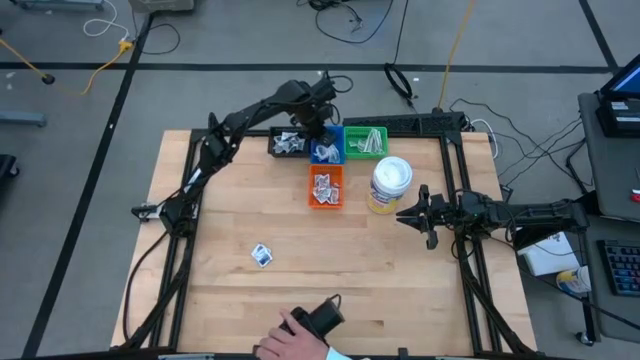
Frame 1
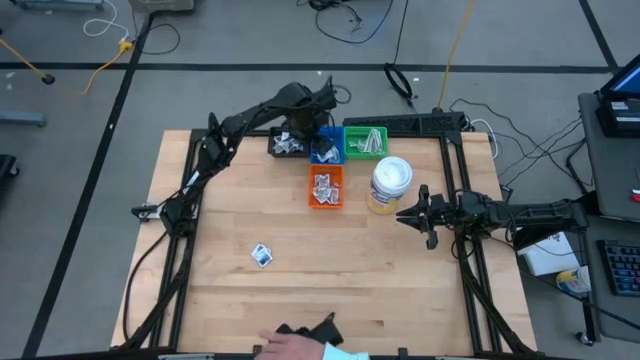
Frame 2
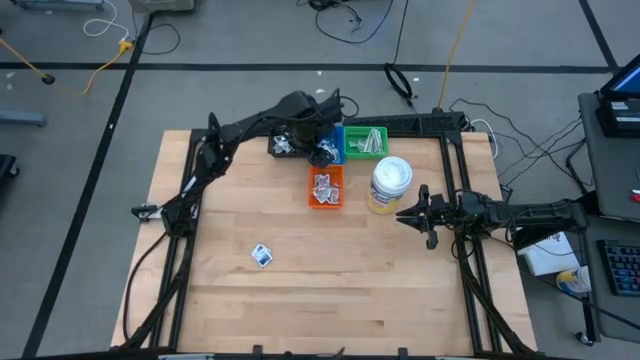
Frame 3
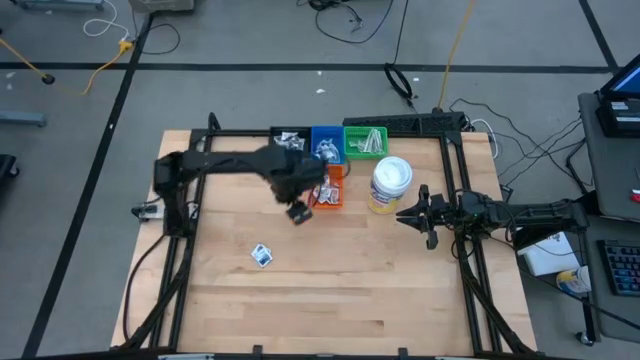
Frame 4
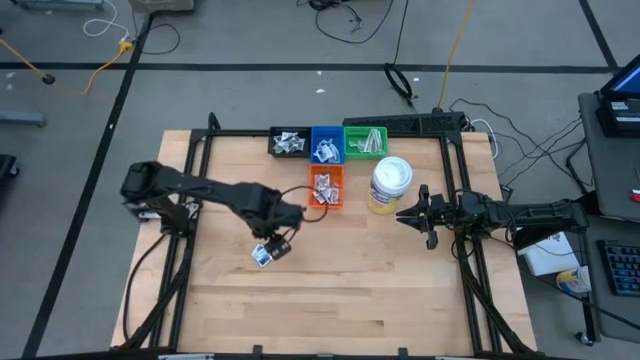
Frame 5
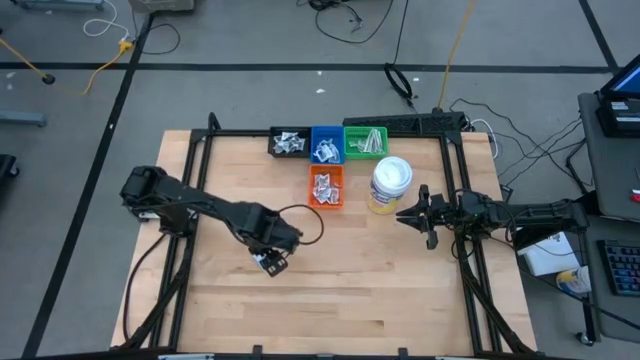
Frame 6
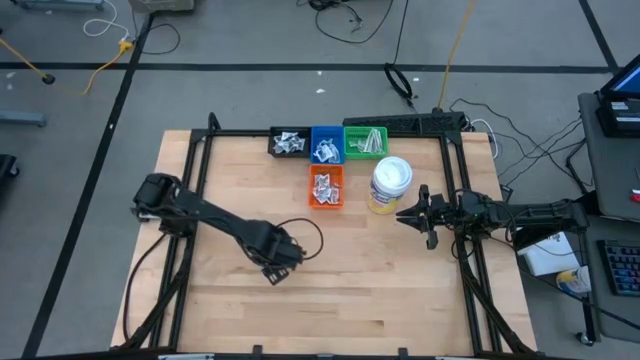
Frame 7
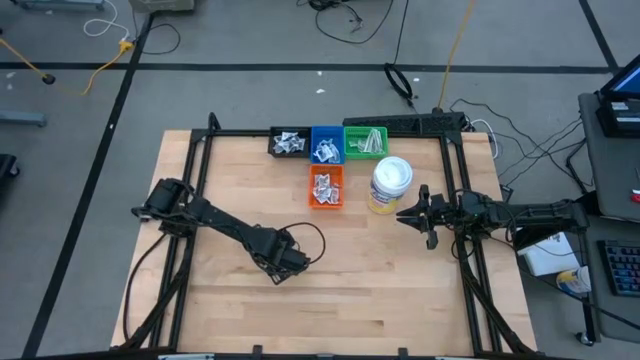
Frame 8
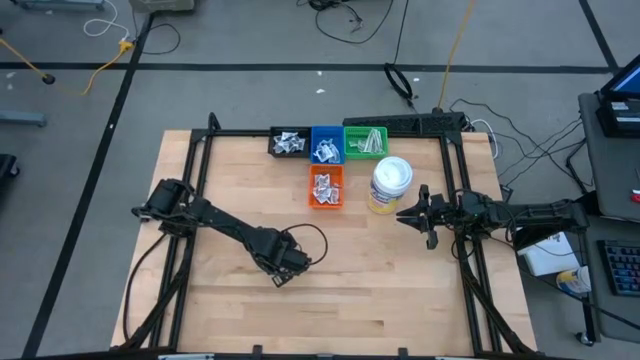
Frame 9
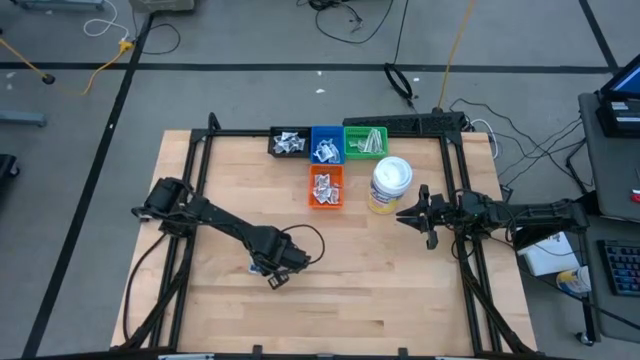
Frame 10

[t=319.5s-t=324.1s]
Task: Pick & Place First Aid Supplies
Put the blue alcohol pad into the blue bin

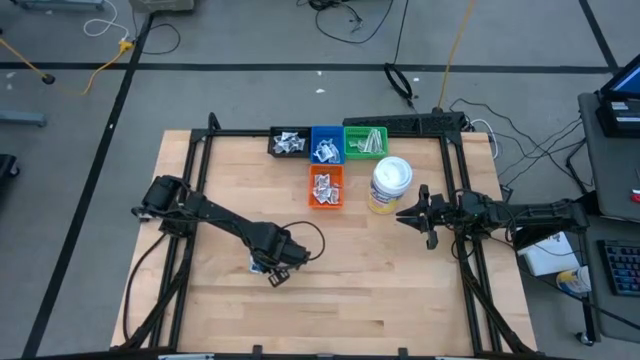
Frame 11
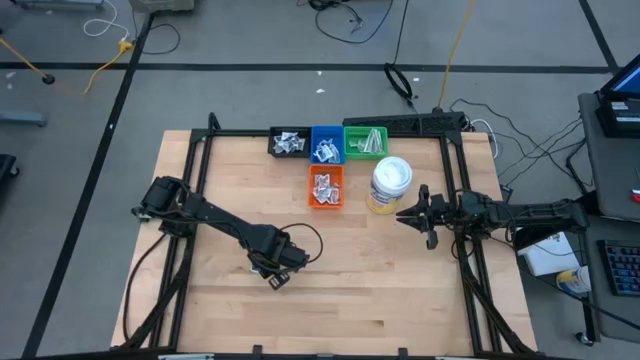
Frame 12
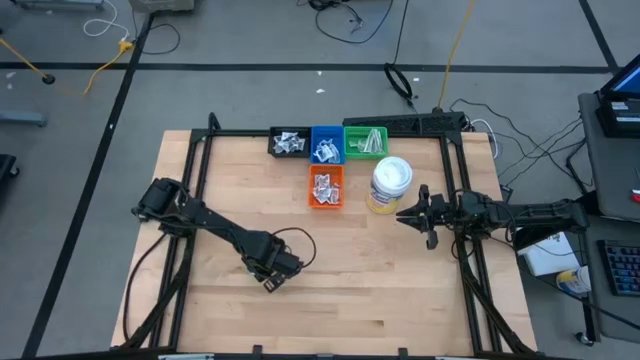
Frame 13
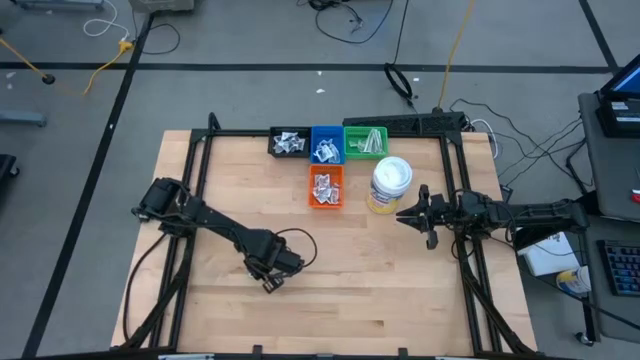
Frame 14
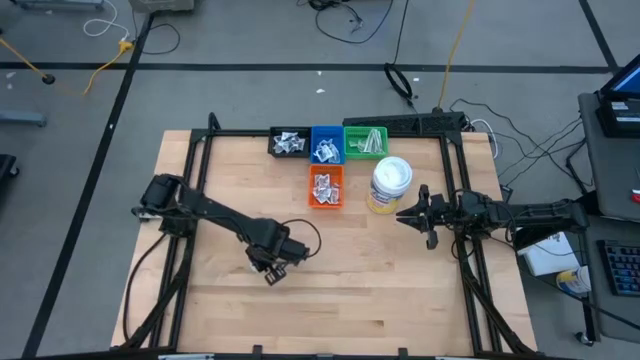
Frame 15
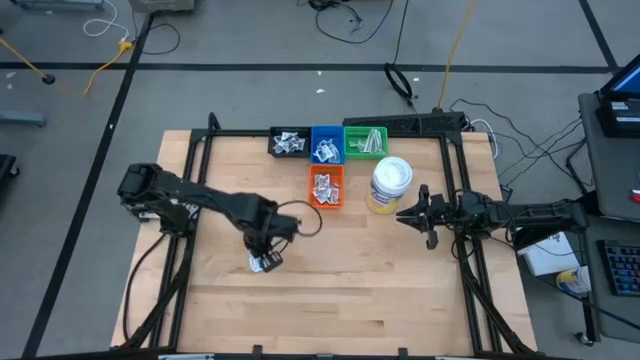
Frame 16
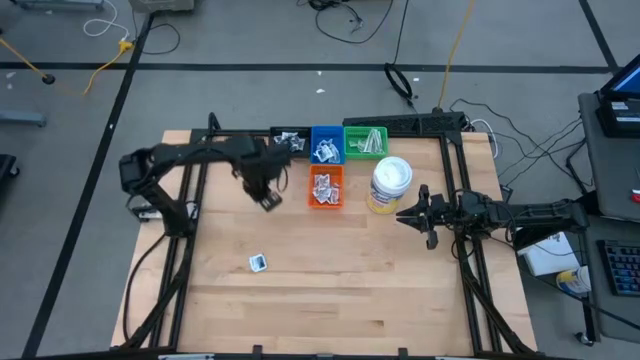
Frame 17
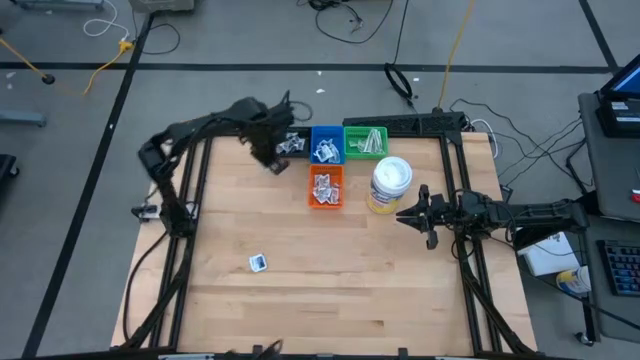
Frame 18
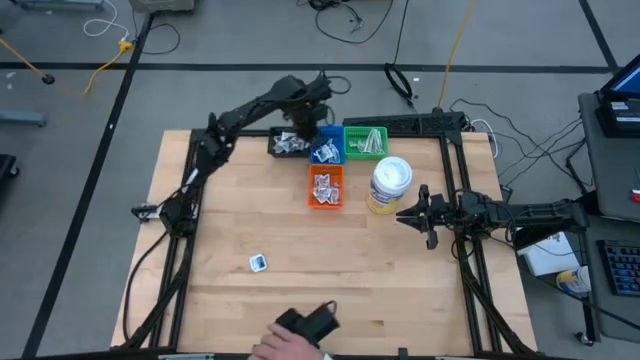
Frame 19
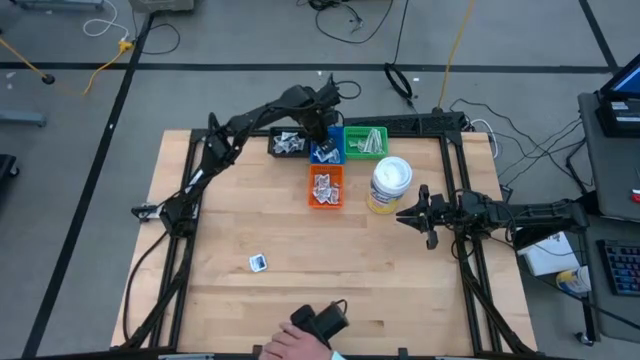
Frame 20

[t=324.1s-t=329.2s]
Put the blue alcohol pad into the blue bin

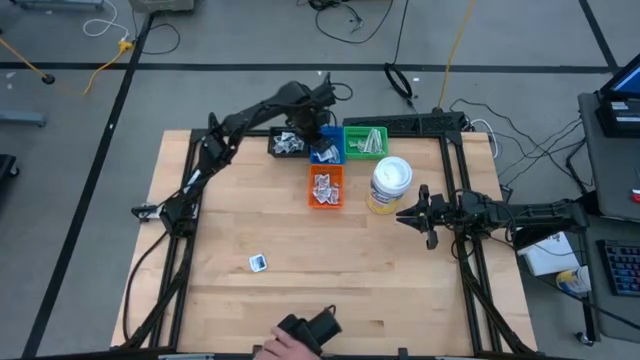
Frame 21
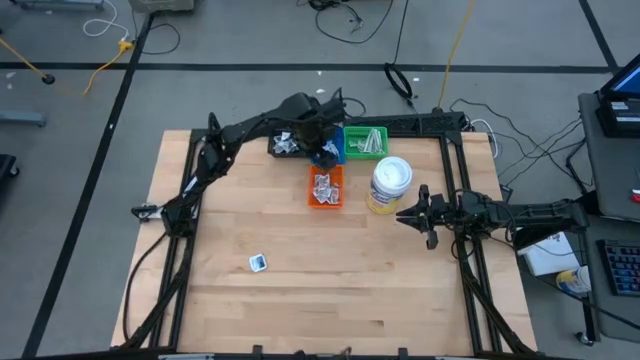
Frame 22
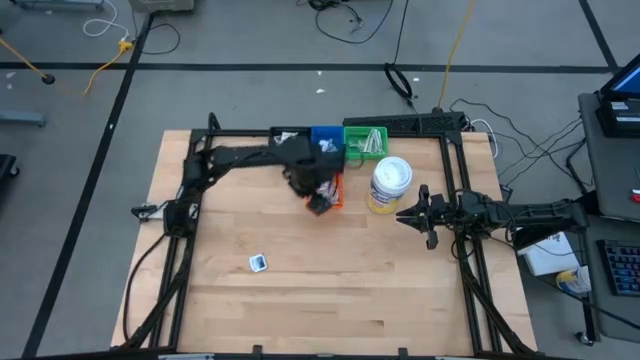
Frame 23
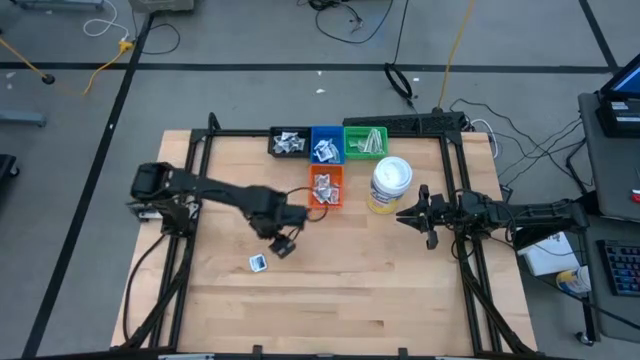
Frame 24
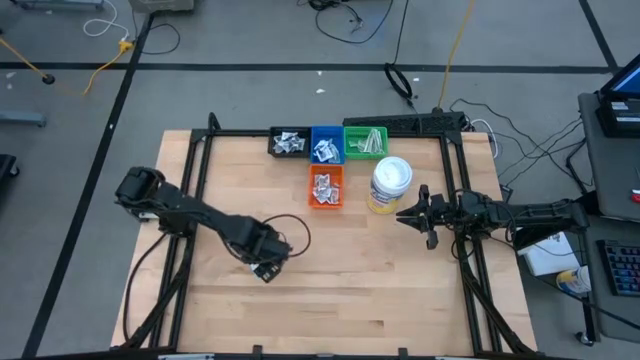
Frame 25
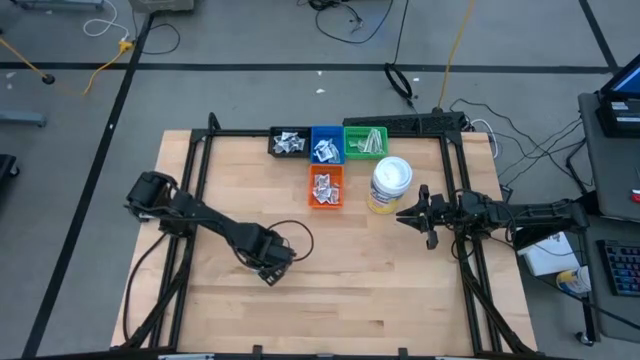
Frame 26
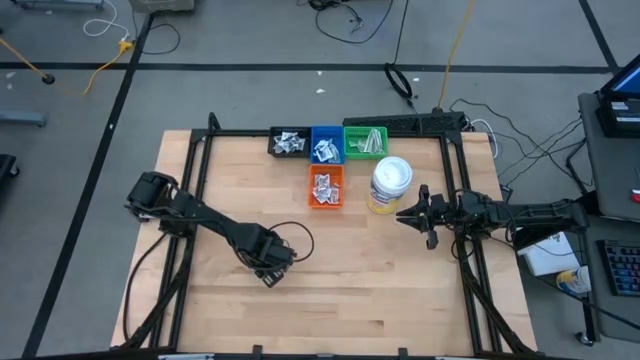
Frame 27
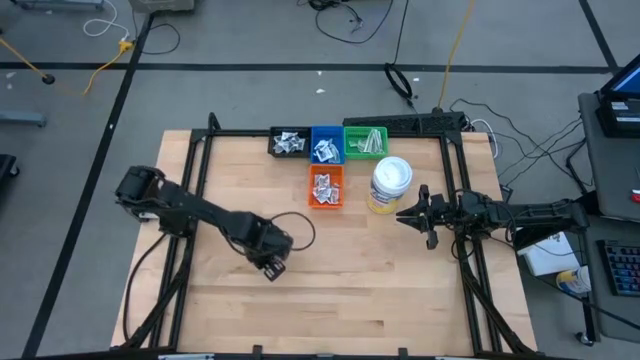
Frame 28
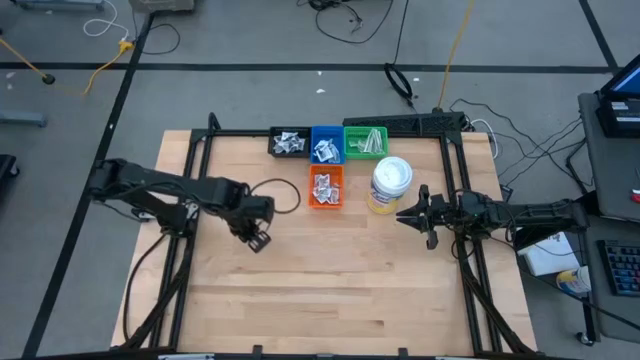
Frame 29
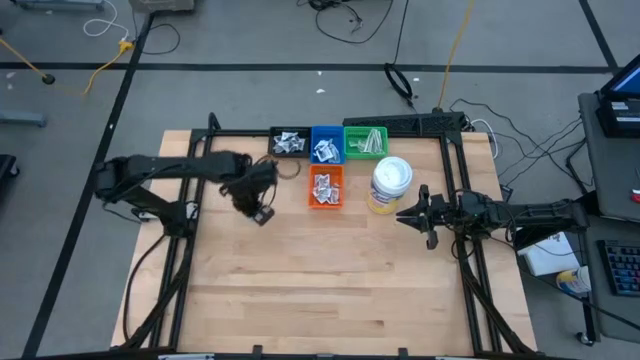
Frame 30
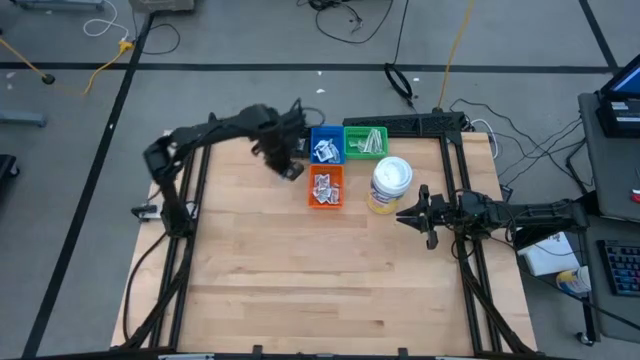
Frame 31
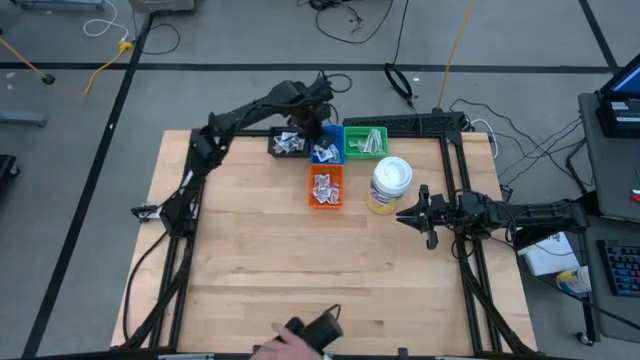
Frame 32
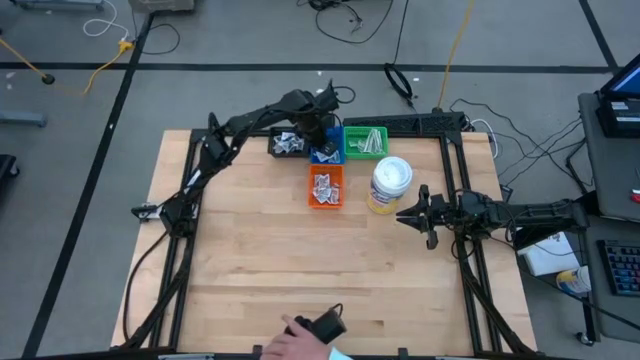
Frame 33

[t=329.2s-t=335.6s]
Put the blue alcohol pad into the blue bin

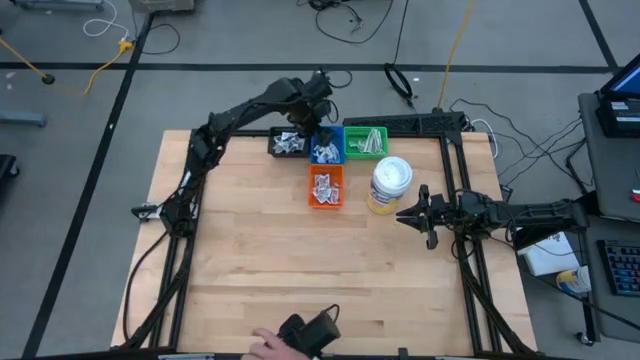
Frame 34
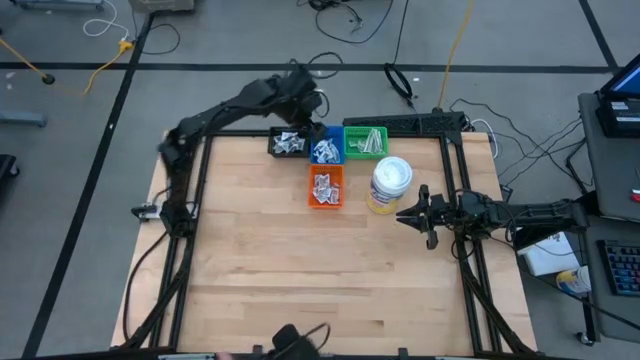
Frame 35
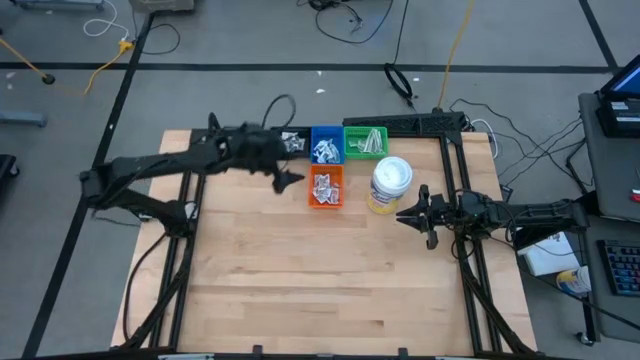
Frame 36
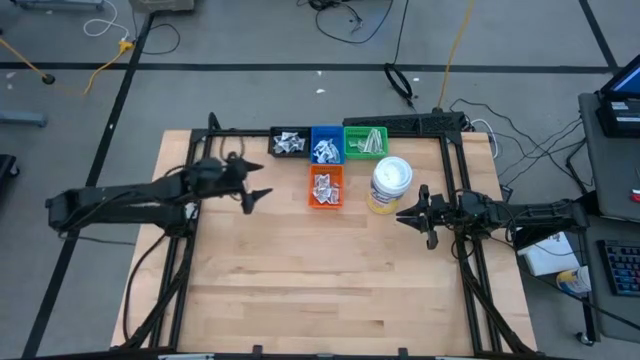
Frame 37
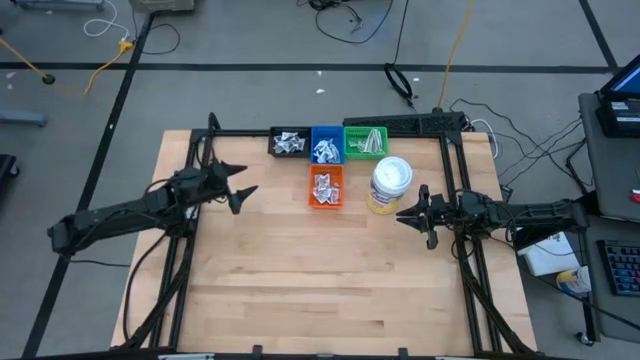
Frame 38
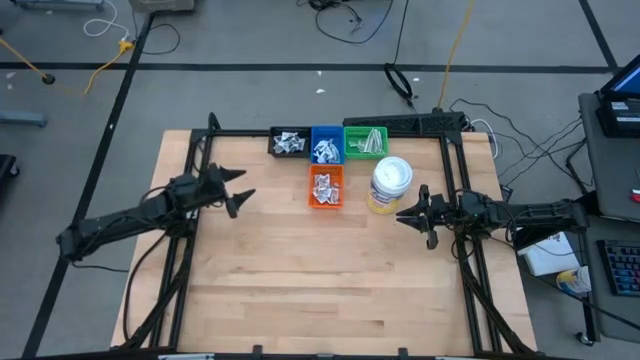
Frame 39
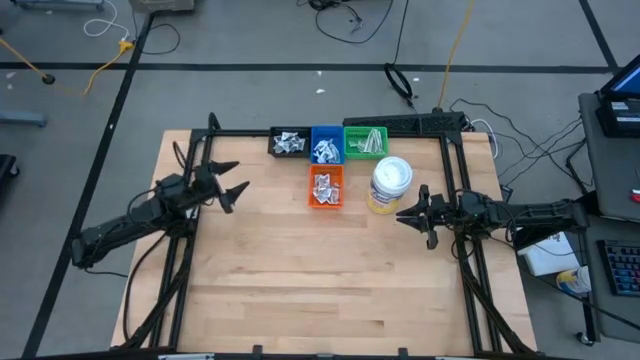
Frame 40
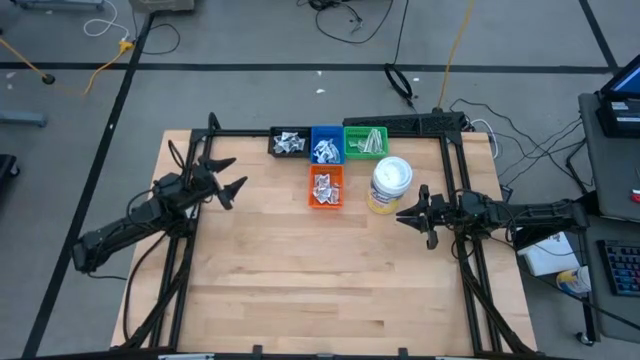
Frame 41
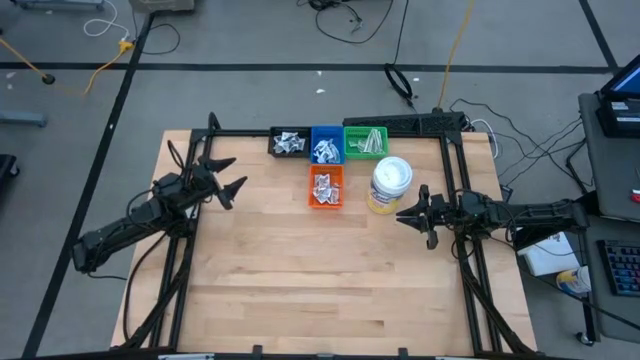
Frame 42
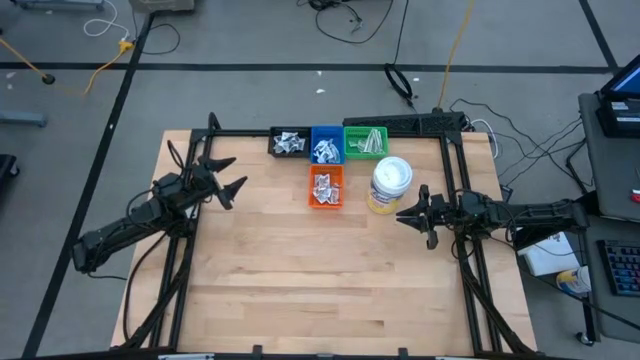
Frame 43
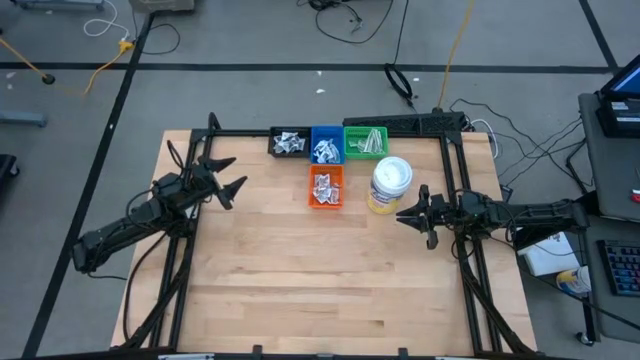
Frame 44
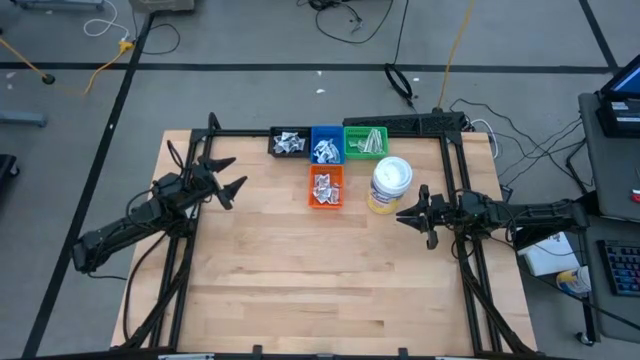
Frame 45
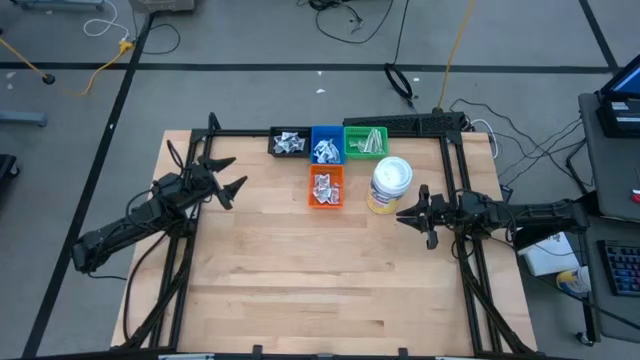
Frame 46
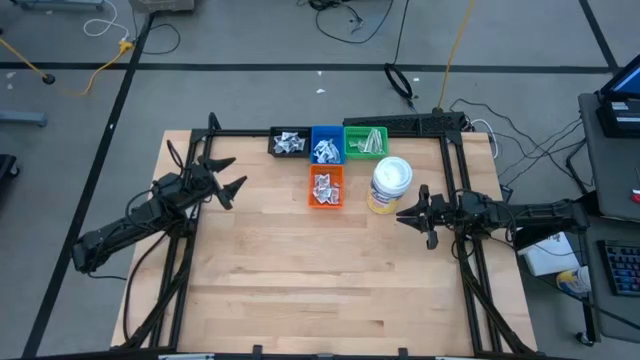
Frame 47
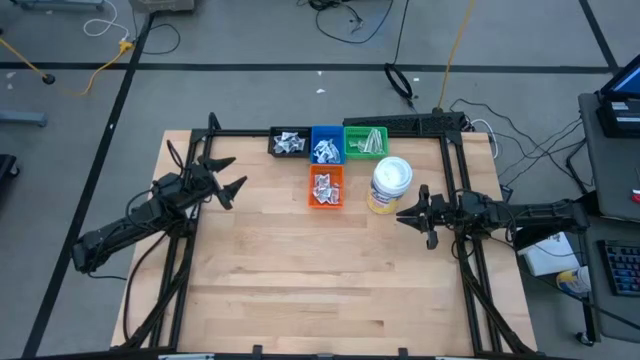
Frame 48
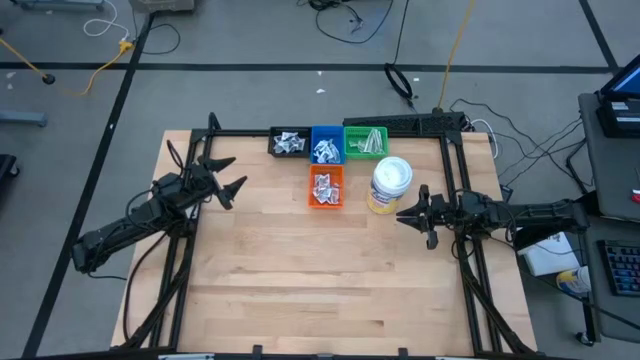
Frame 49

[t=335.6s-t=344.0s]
Return to Home Position
